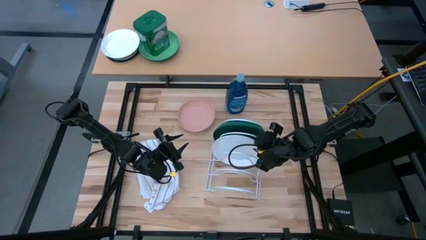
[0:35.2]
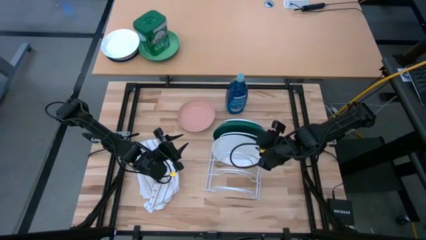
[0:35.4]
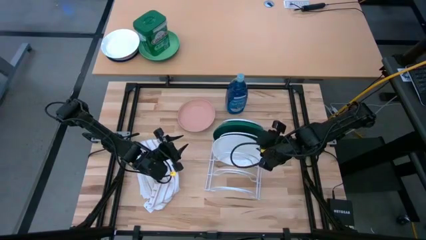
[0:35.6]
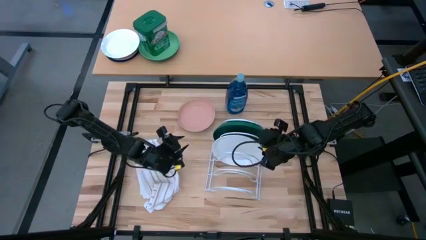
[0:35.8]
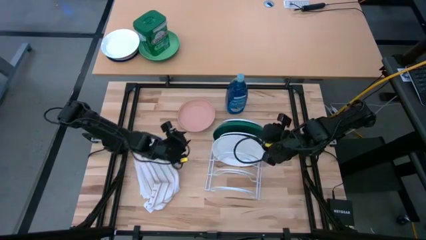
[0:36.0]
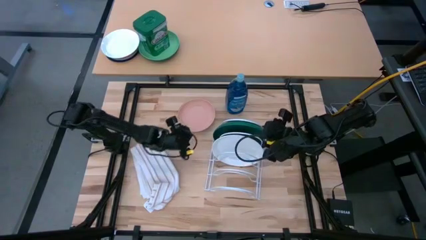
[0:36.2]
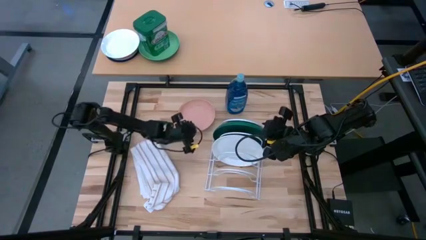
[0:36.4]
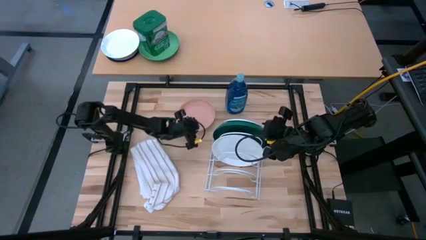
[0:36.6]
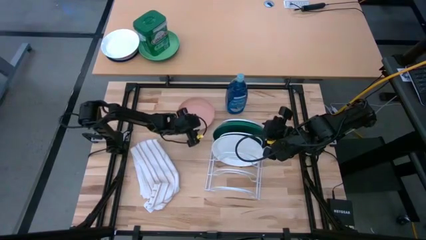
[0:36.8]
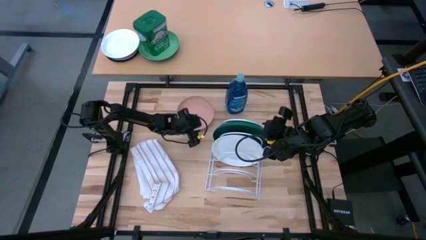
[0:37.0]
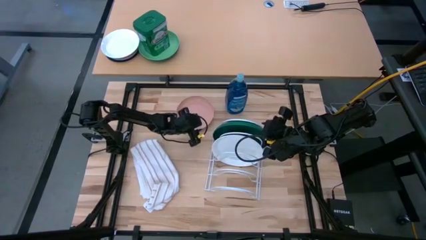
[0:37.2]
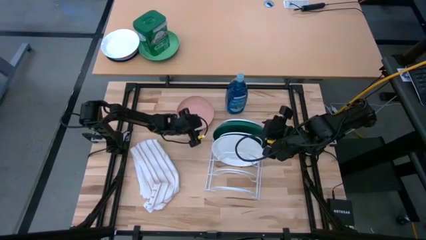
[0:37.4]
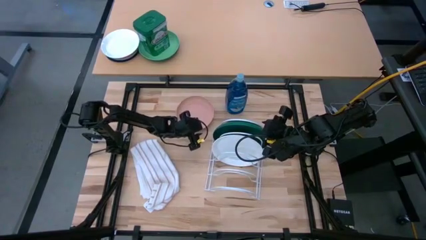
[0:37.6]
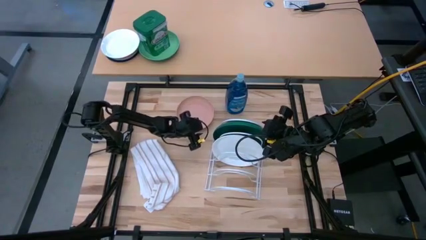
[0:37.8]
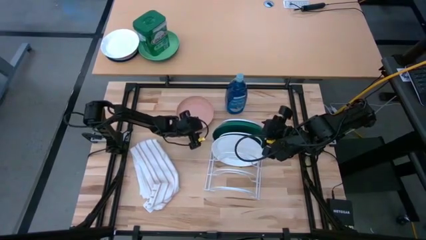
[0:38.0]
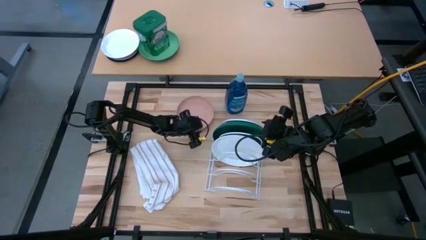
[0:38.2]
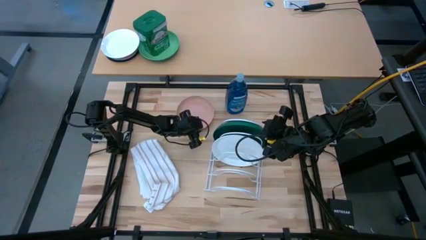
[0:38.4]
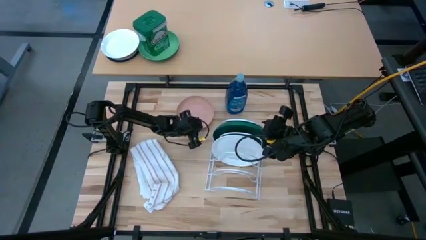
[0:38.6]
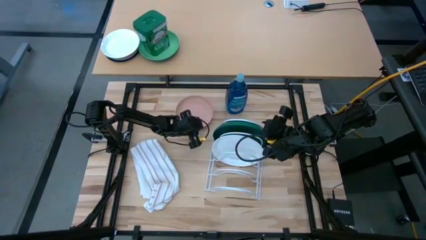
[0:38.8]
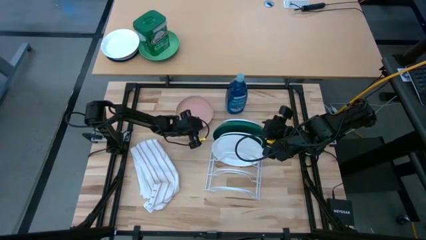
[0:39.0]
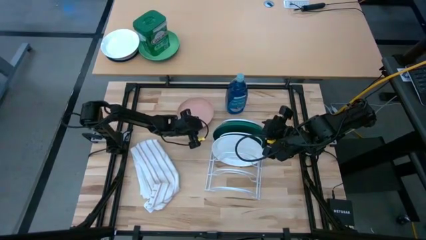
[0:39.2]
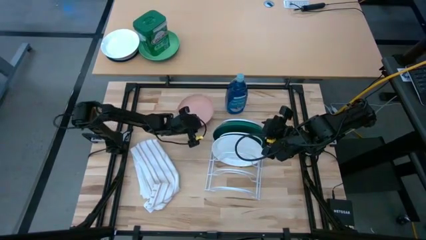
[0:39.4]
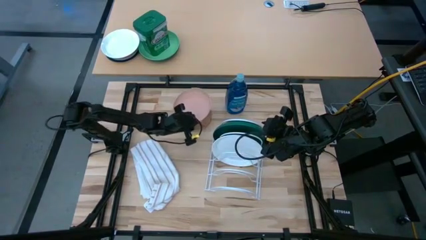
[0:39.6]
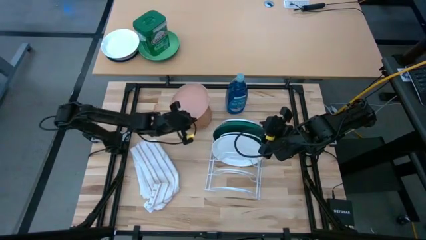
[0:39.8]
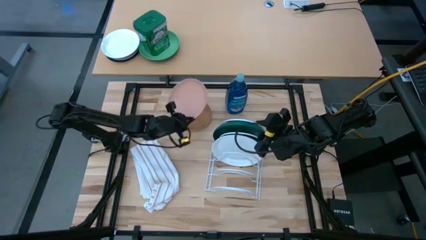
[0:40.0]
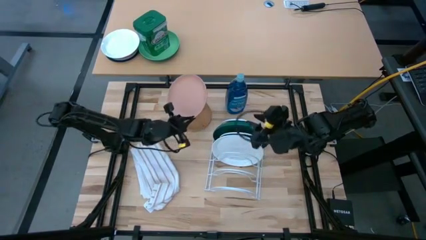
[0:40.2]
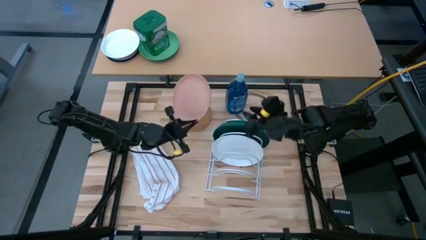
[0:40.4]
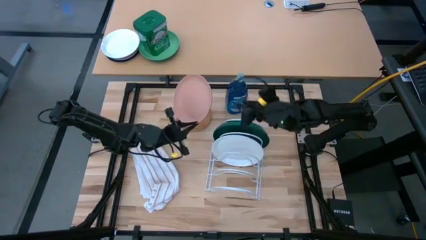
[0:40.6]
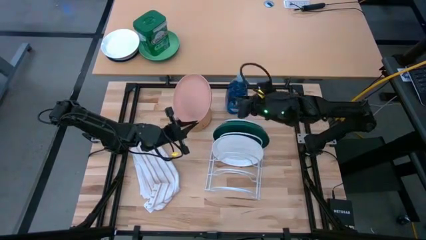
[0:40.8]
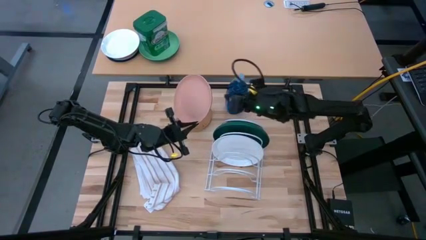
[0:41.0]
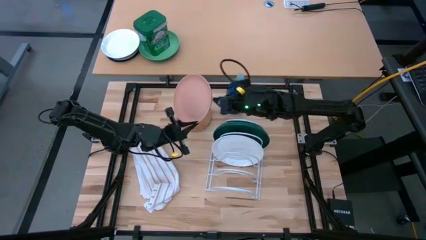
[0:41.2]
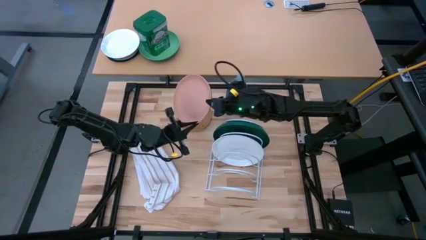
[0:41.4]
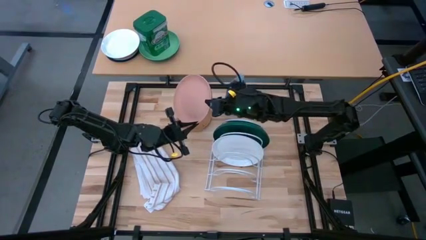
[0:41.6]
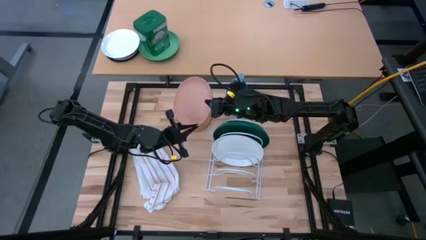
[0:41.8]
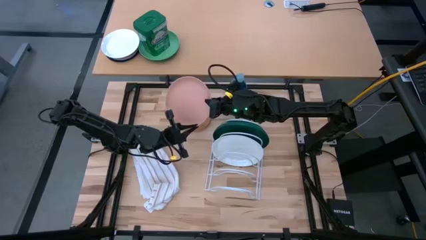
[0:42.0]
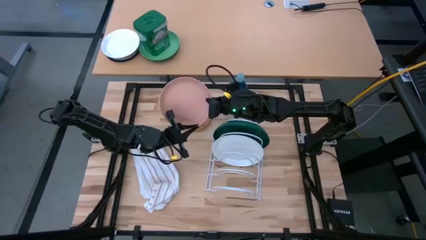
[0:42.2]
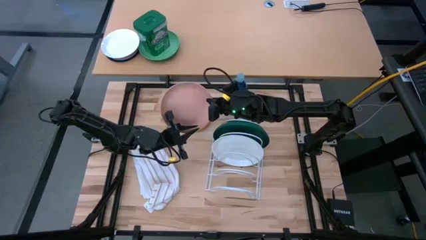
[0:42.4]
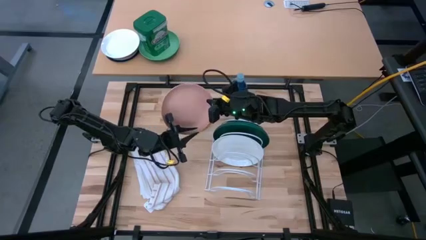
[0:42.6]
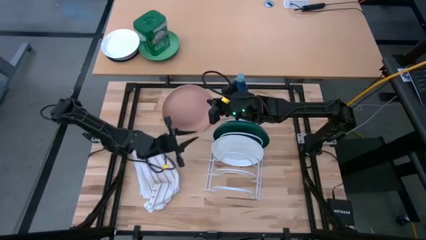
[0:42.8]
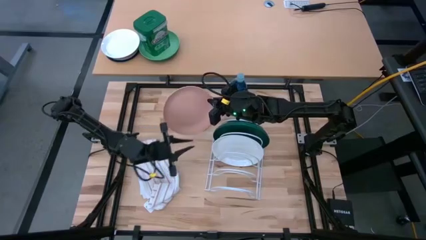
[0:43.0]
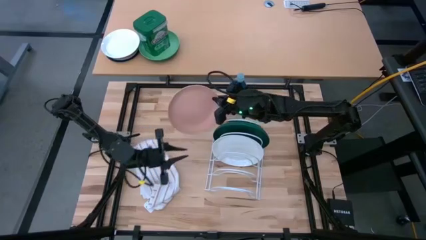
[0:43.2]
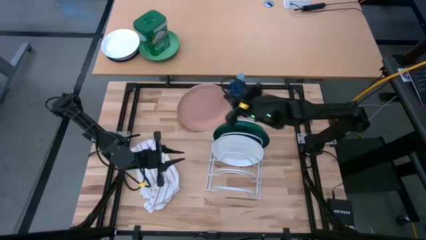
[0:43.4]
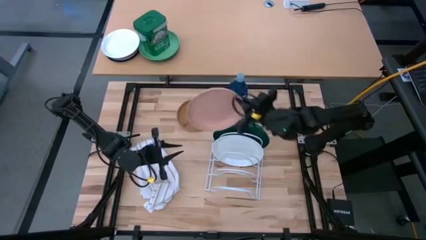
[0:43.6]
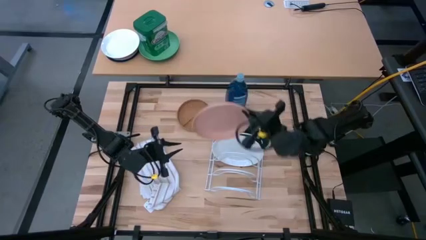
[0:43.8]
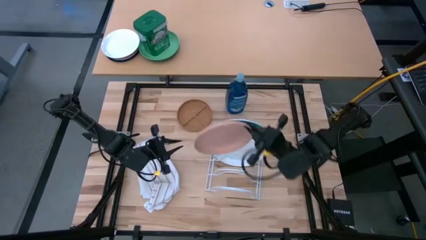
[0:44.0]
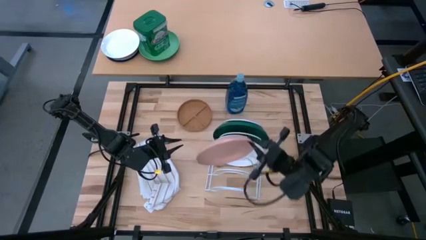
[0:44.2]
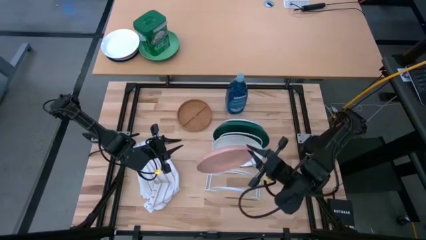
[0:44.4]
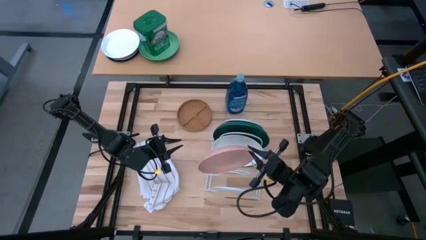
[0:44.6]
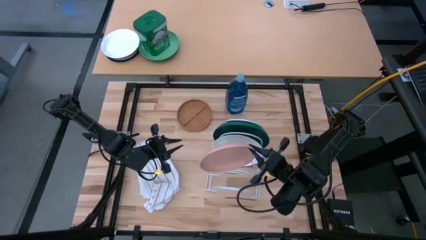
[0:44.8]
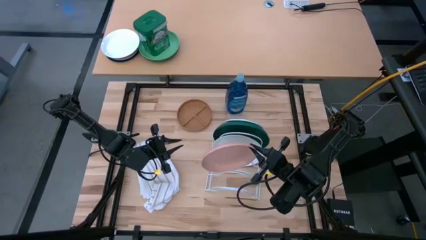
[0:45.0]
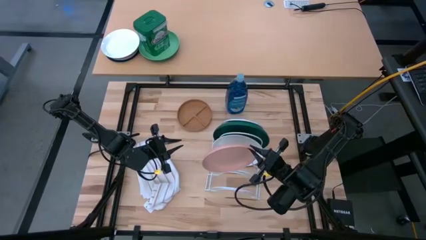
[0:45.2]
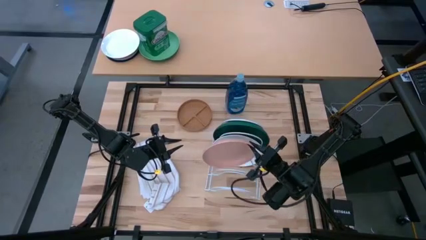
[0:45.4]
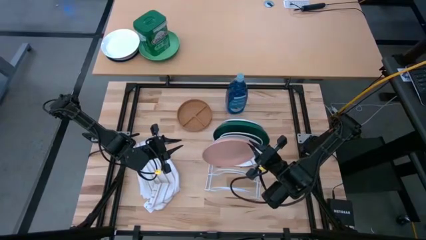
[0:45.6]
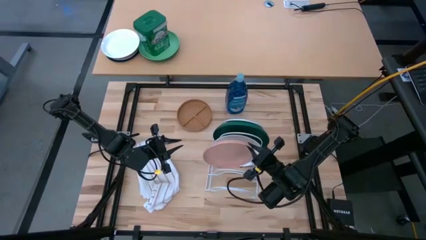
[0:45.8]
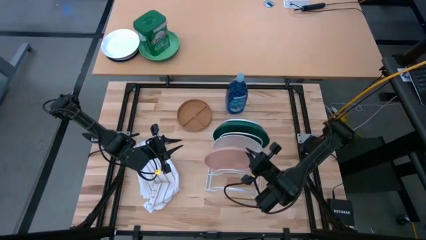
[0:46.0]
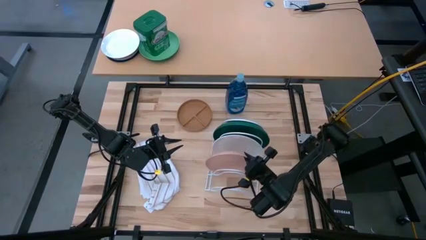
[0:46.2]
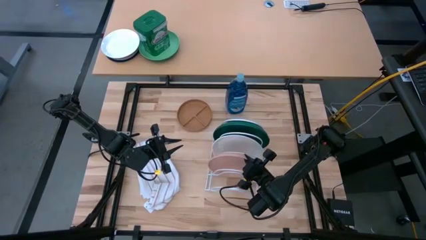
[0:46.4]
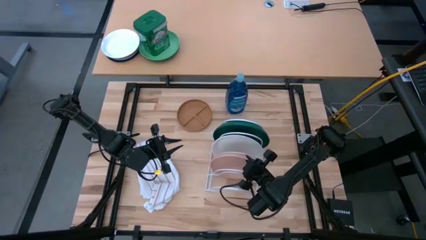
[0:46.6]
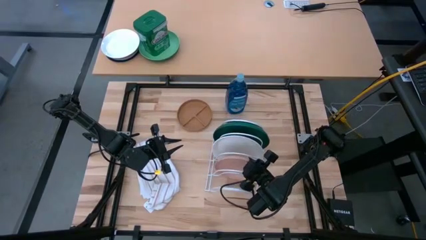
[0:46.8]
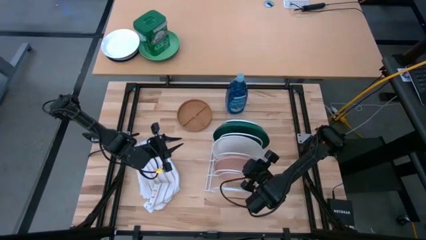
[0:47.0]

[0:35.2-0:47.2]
Task: Sort dishes
Put the pink plate in the dish rack
